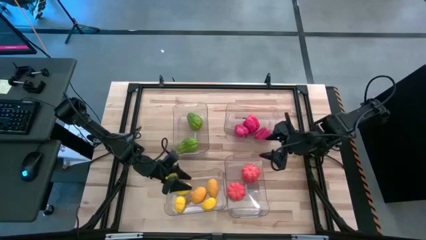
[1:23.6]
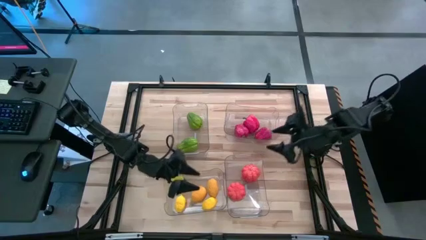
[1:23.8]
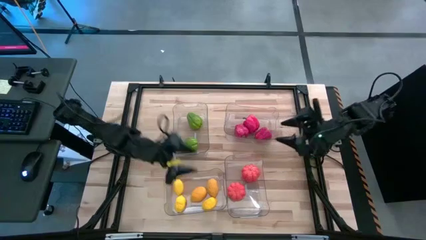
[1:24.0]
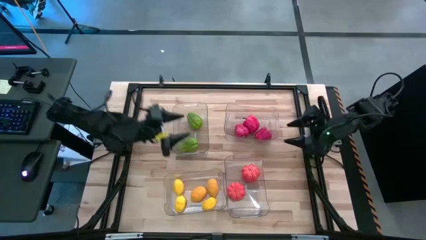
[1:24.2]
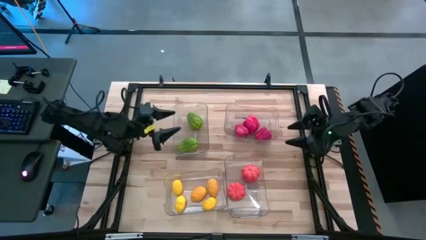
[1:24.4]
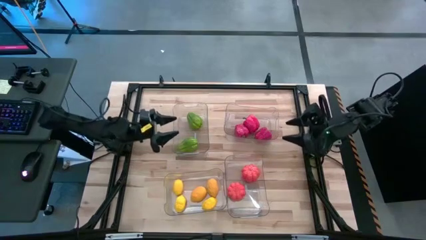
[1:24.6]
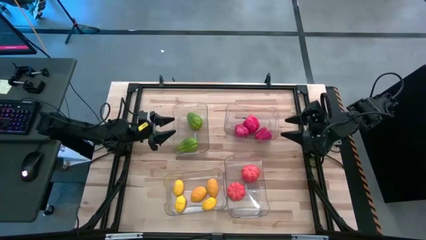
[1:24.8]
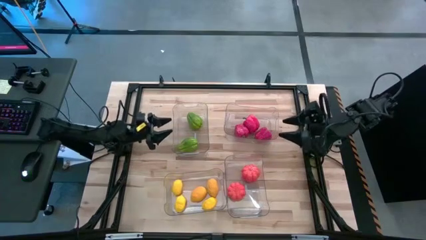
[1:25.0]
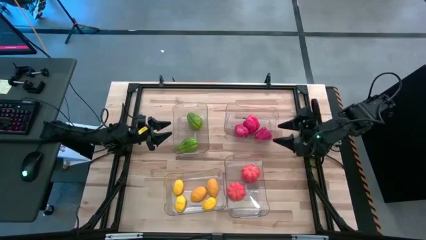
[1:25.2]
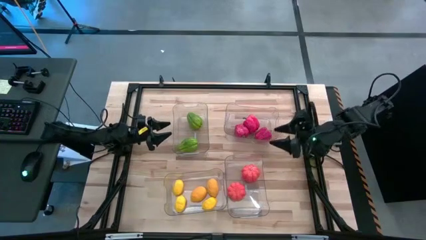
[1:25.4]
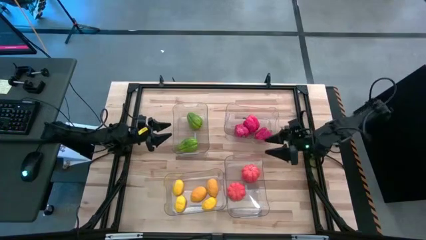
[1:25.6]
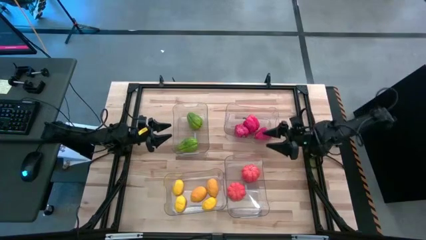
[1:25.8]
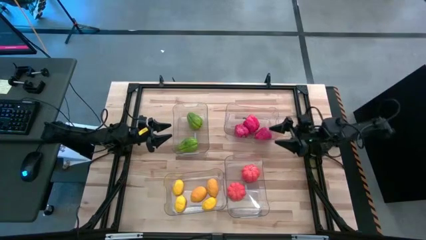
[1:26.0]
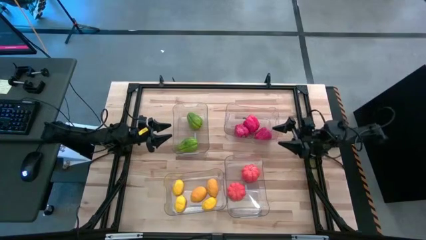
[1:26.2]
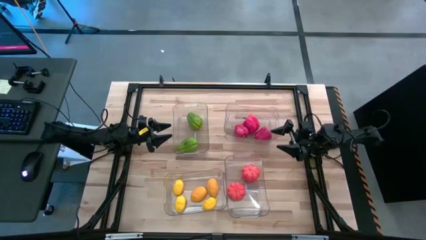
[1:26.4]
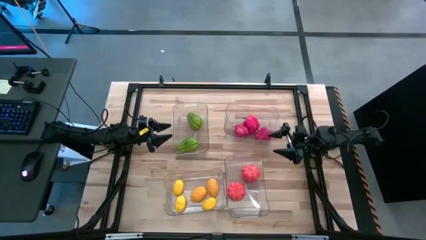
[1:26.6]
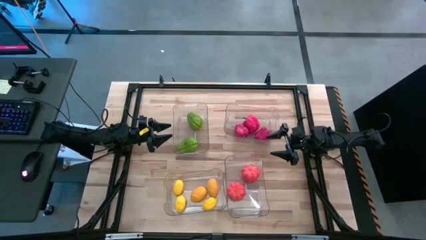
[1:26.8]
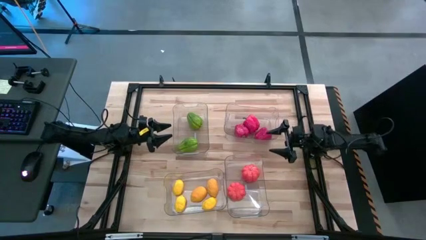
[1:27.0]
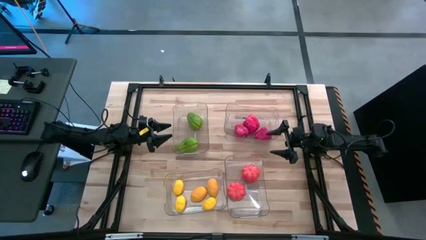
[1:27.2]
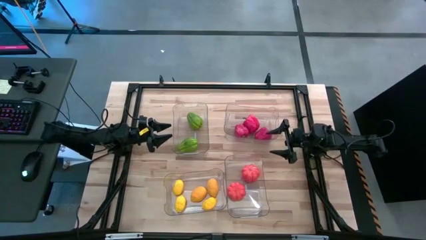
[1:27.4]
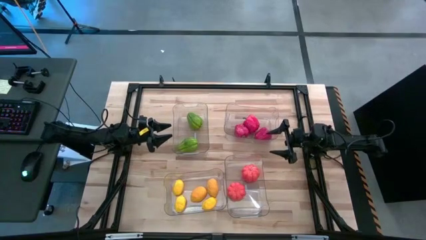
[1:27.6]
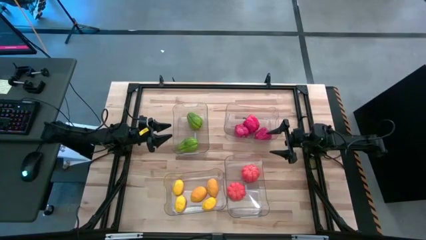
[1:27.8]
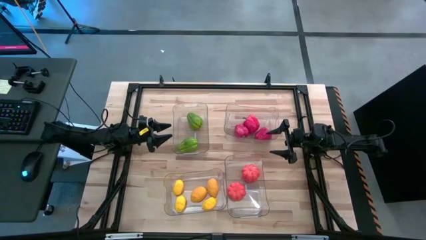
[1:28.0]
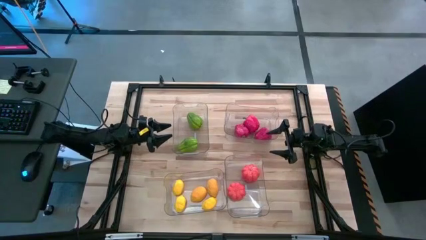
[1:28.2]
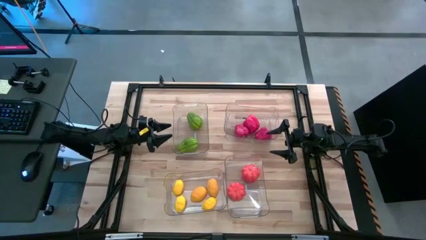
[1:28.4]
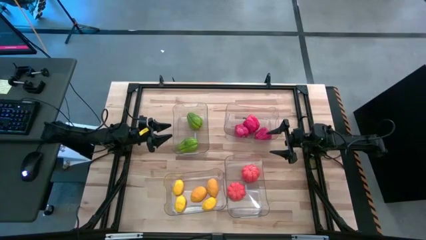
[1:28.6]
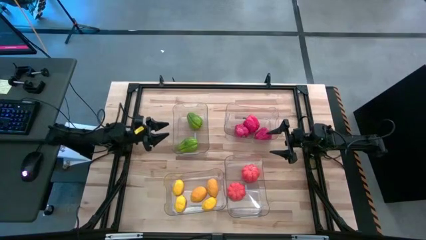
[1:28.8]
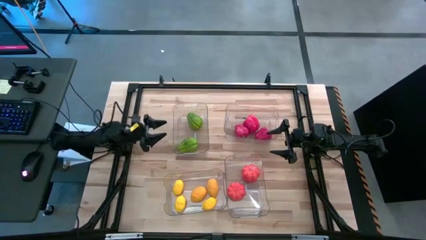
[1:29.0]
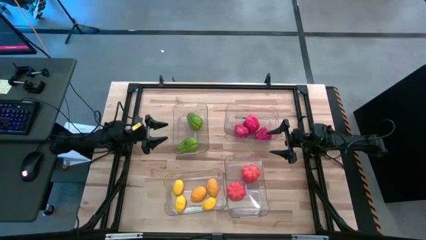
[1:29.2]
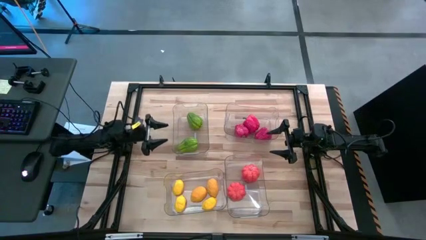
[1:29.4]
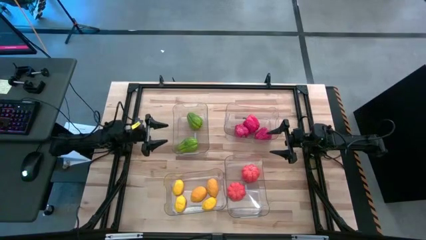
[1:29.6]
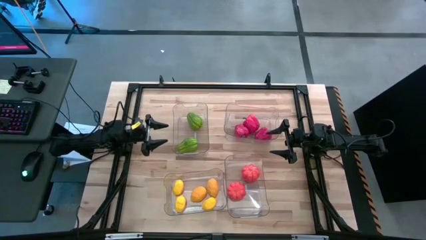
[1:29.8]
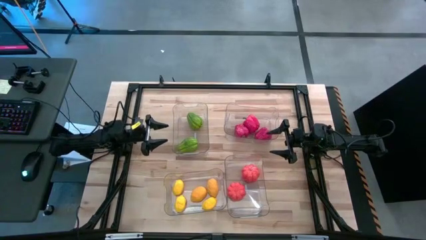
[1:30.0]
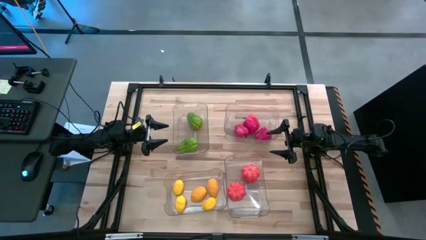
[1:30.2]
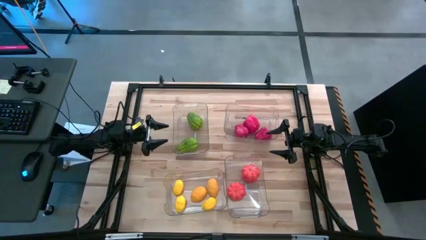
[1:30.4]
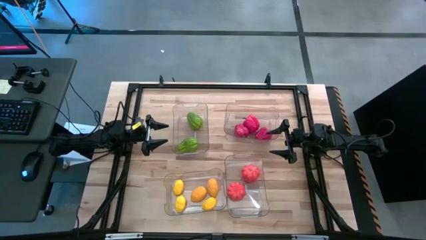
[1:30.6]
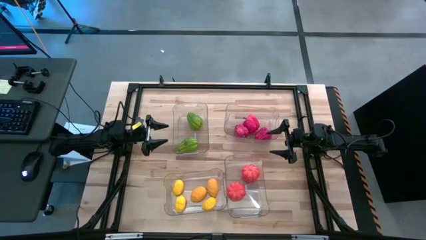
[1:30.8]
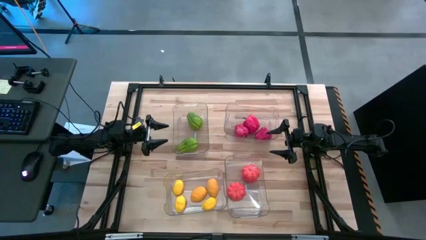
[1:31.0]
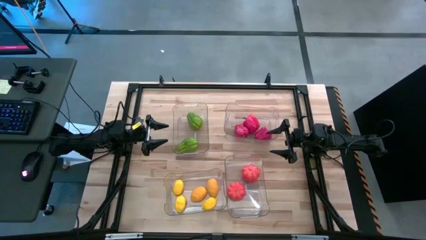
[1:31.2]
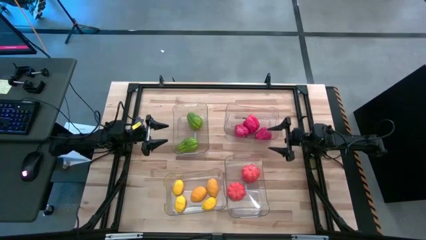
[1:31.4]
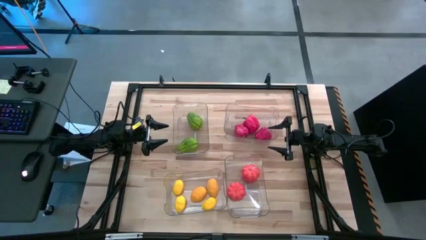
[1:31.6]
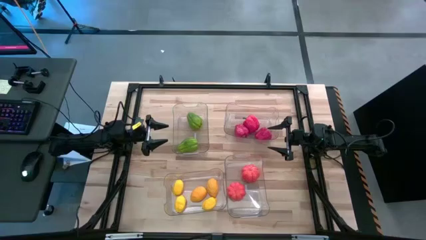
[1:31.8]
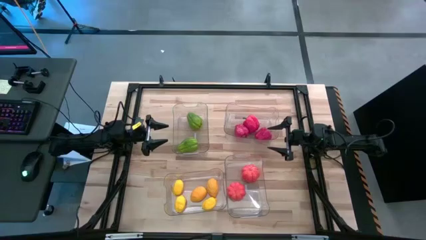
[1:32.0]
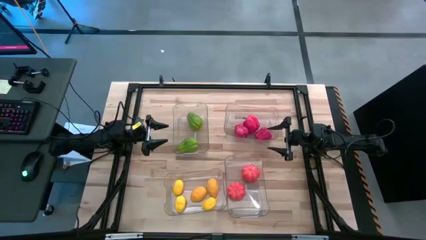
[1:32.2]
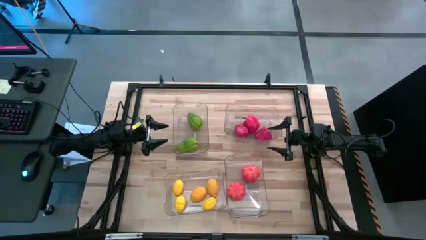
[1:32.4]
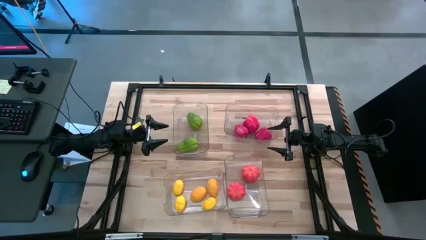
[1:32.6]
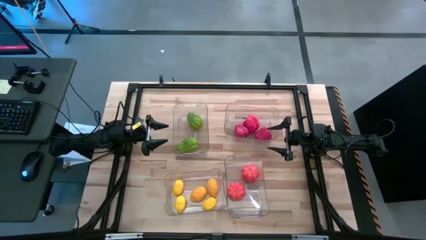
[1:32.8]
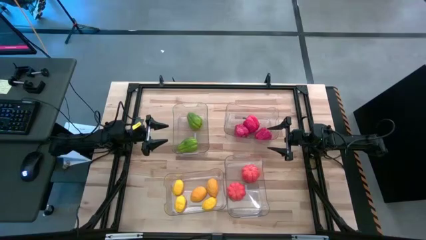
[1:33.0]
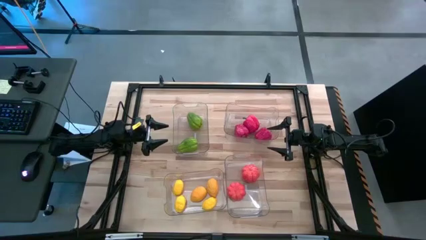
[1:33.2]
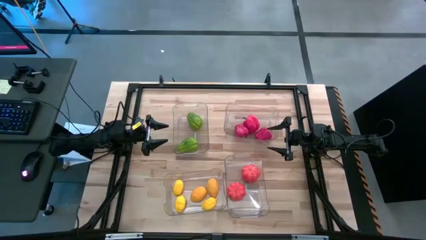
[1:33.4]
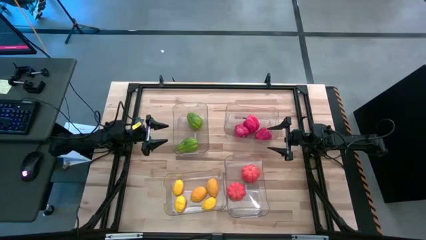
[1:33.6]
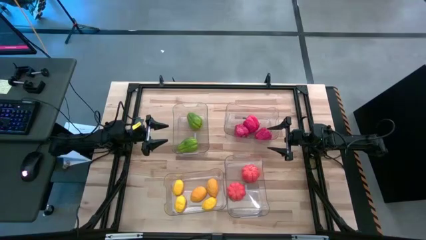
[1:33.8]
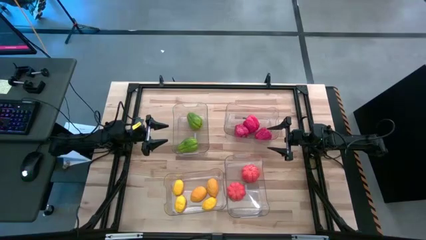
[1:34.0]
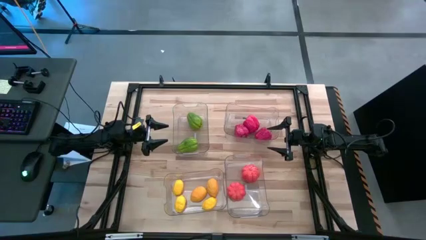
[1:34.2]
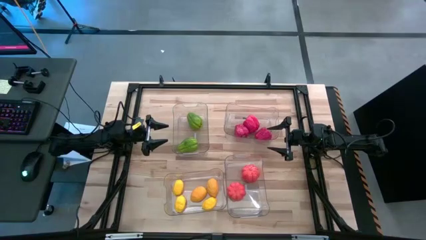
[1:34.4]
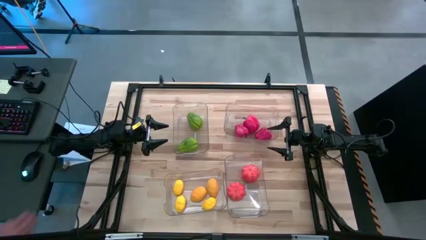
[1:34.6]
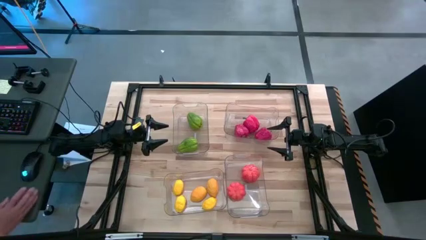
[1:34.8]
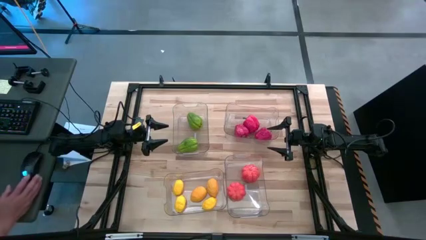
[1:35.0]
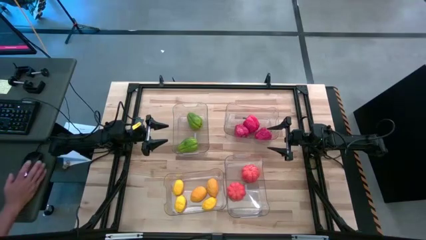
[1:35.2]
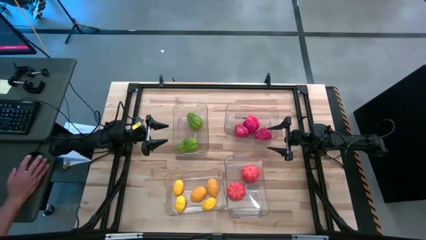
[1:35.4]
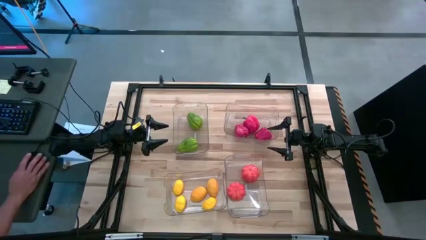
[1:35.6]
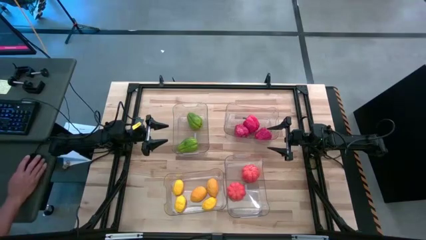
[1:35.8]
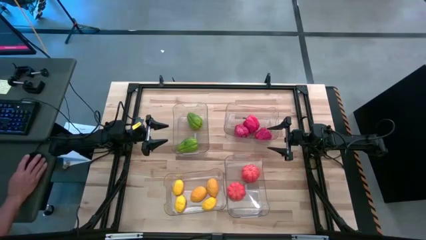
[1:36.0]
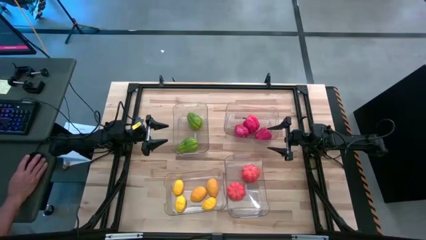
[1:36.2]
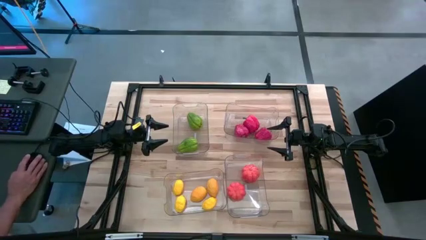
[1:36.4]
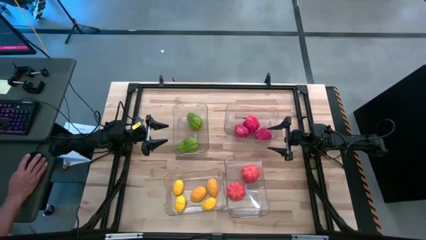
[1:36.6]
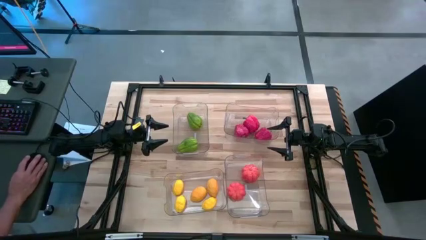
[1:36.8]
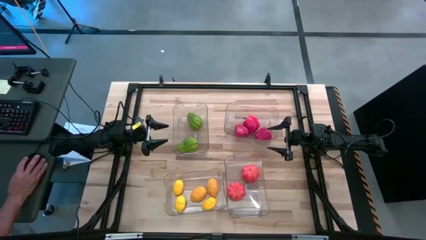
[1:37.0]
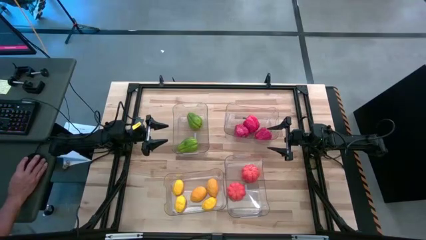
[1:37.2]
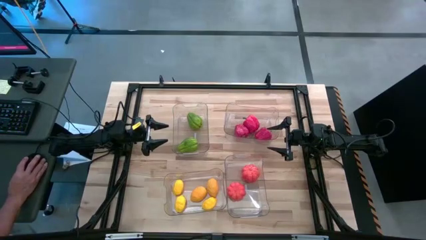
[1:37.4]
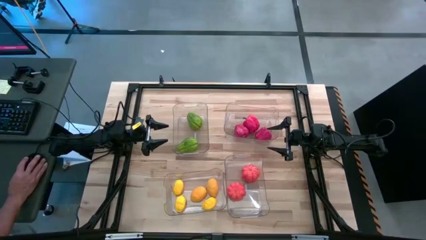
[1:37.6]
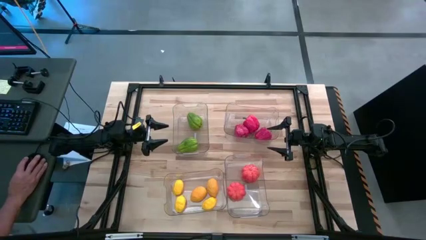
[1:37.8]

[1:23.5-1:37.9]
Task: Sort produce into baskets
Return to Home Position
